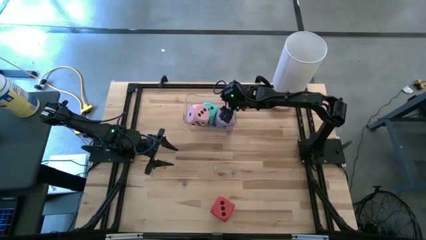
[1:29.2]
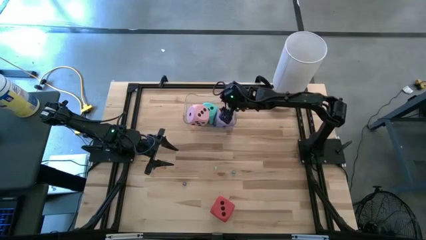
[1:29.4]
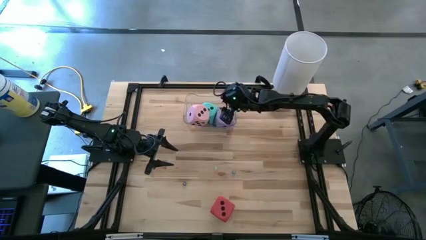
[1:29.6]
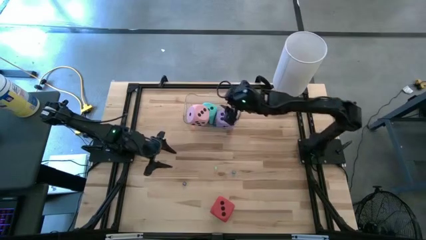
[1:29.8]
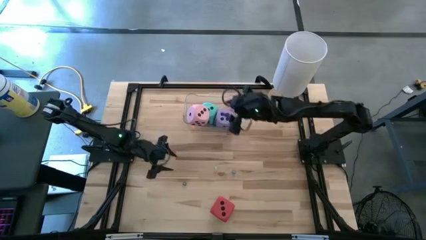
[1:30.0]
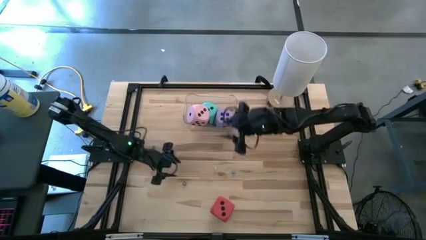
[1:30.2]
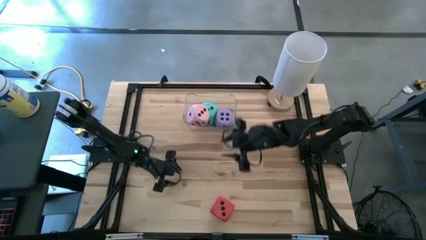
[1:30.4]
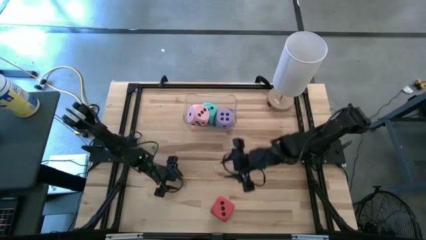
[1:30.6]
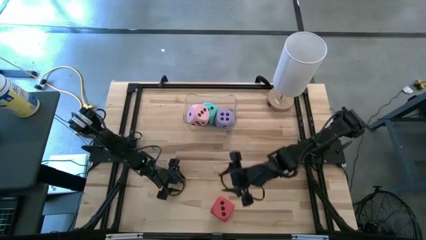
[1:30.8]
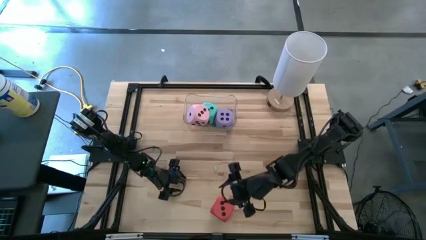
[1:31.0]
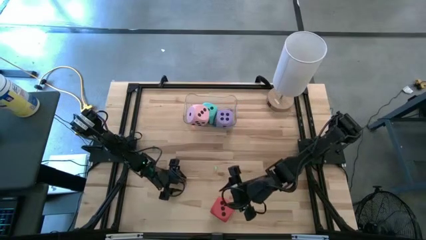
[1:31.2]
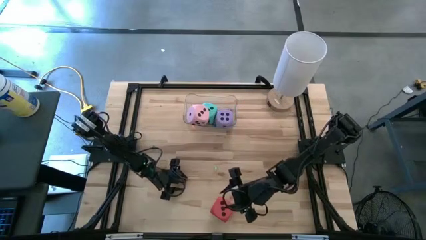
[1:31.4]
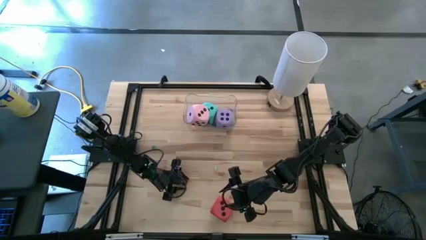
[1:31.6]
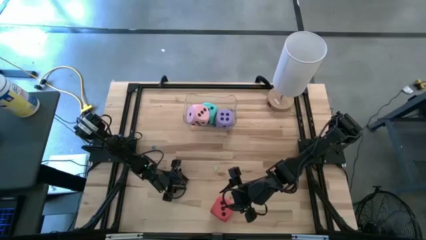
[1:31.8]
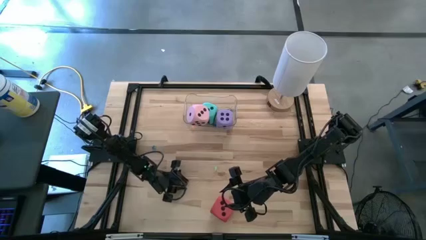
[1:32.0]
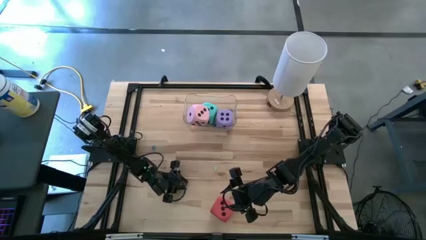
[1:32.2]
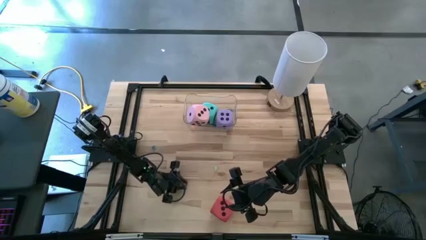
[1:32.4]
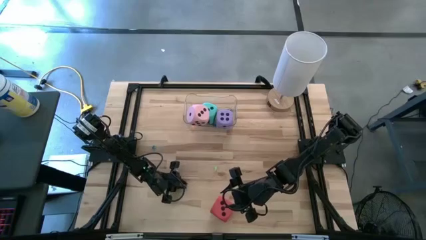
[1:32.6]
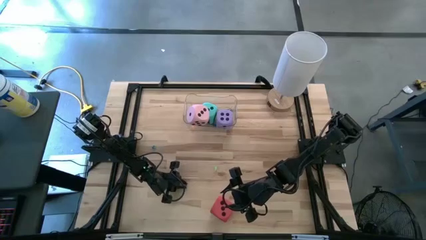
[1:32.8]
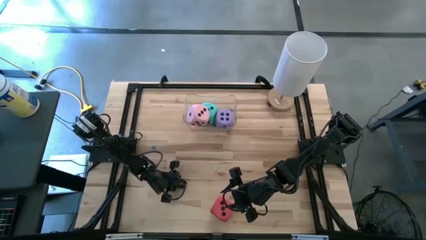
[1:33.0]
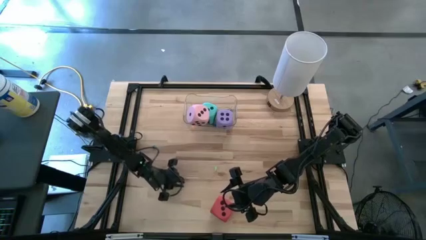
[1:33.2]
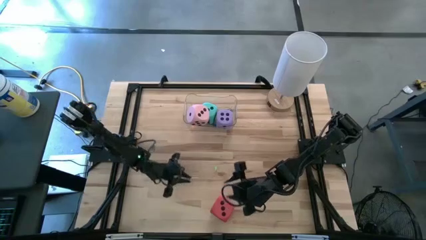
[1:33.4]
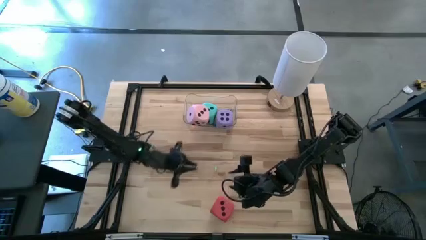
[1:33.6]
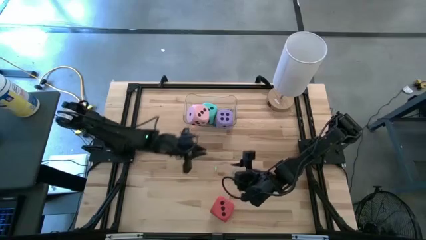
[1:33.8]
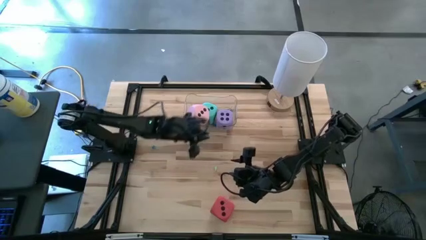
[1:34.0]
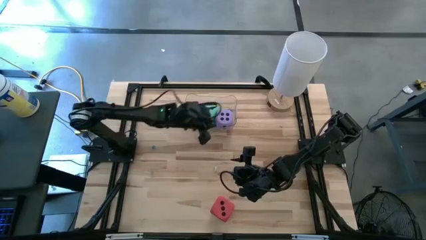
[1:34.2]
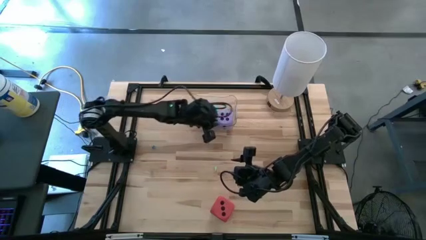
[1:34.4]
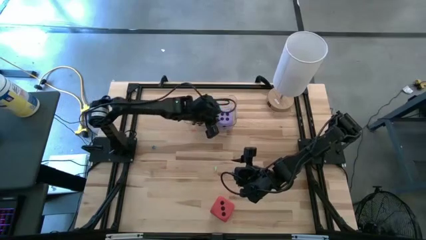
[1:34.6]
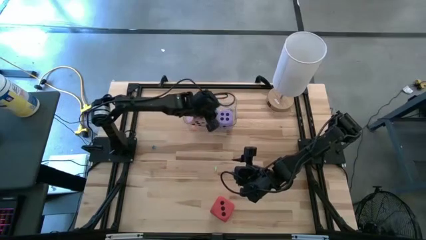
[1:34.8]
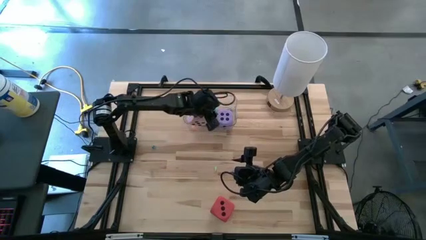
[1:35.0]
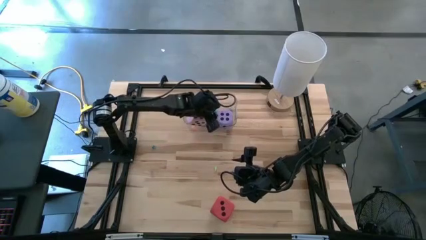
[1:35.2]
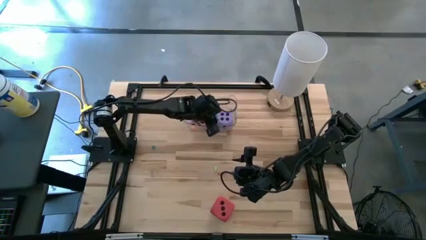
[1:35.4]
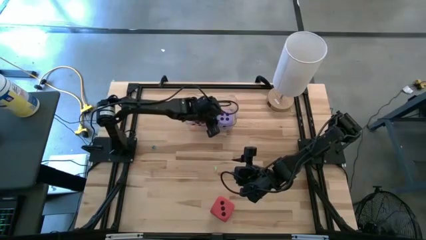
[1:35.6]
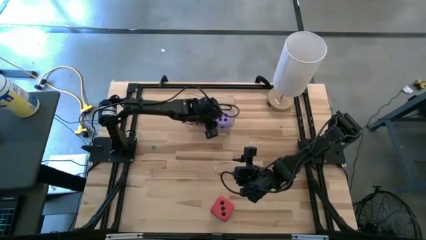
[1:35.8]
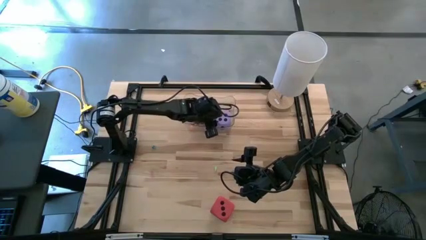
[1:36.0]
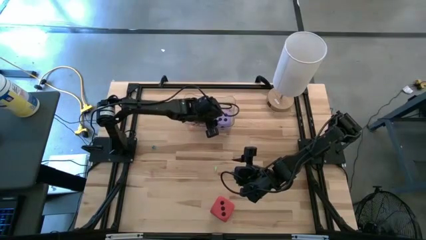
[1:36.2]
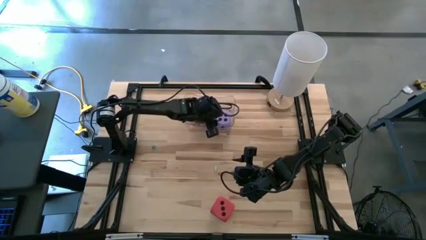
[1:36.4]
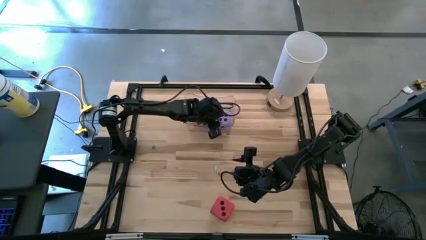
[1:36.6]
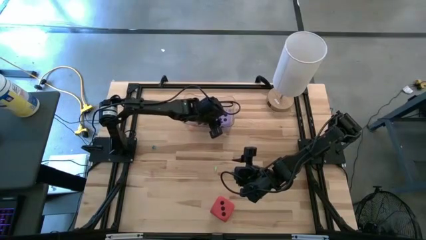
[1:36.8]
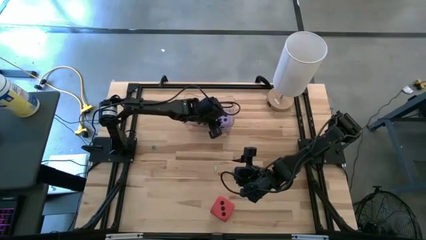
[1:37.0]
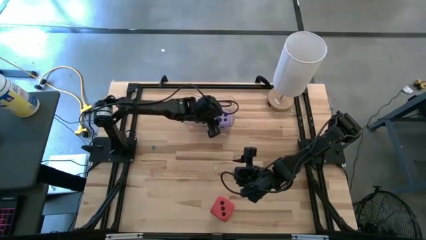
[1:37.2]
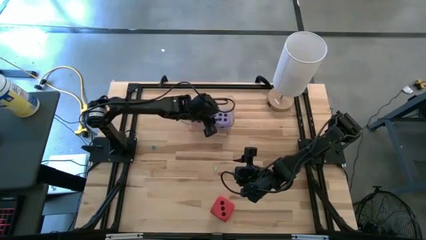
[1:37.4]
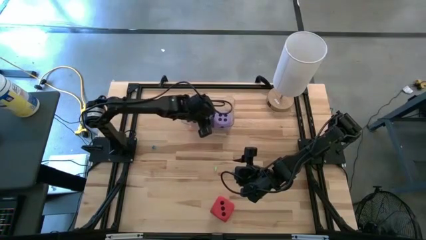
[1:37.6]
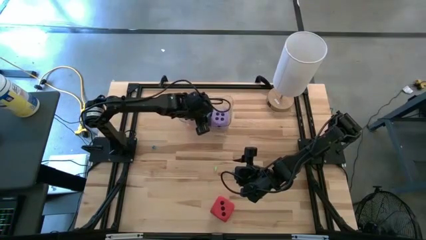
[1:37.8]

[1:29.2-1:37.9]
Task: Pick & Place Dice
Put the dark blue dice into the transparent bin

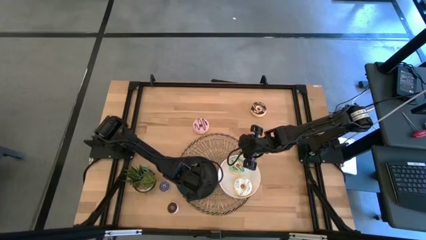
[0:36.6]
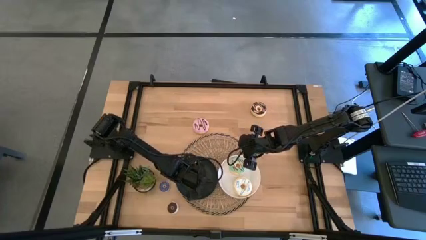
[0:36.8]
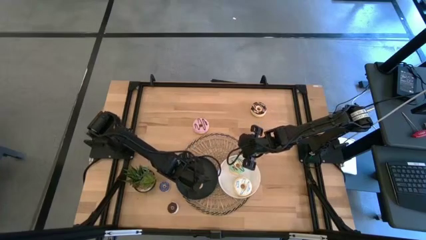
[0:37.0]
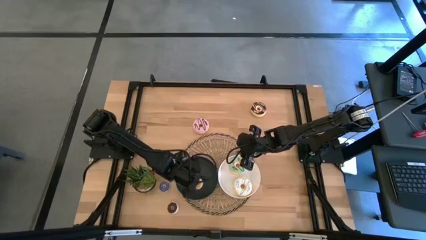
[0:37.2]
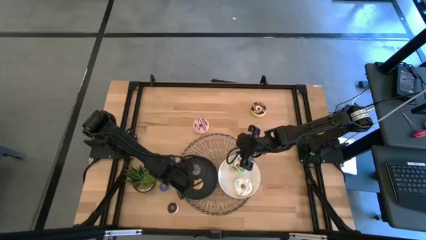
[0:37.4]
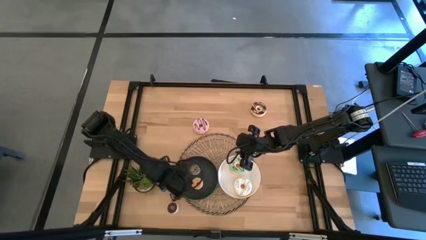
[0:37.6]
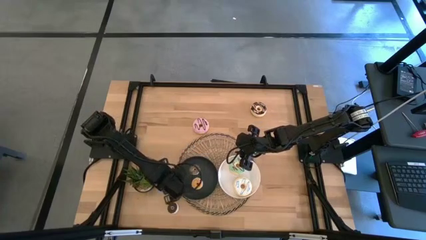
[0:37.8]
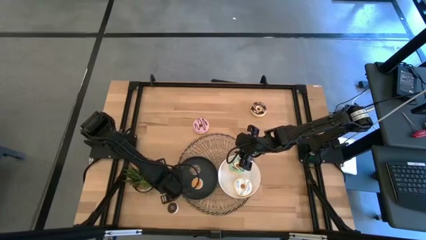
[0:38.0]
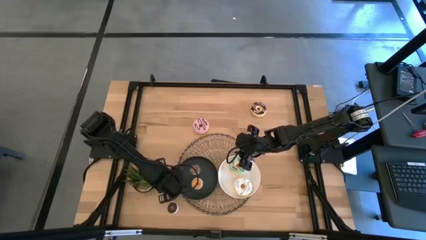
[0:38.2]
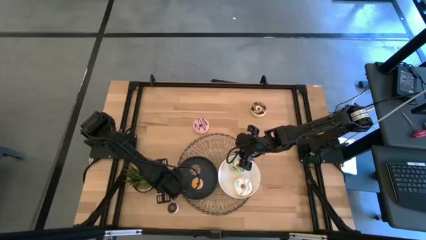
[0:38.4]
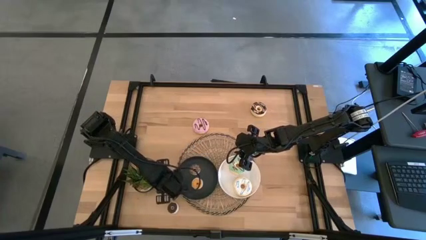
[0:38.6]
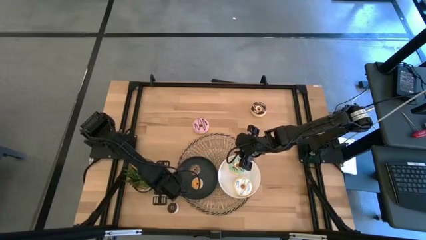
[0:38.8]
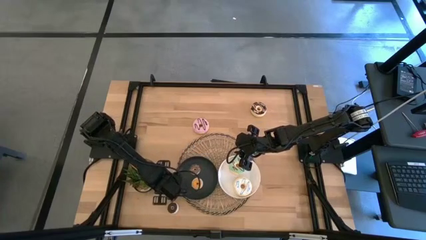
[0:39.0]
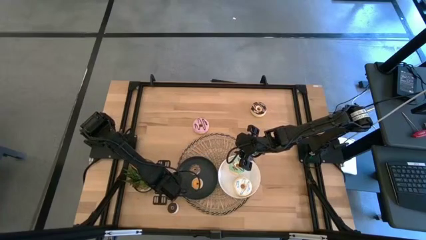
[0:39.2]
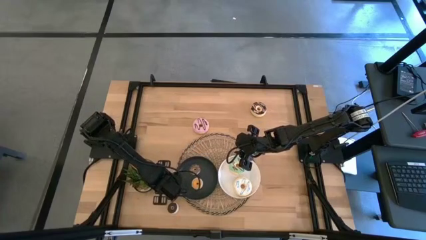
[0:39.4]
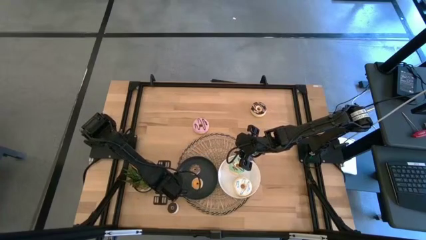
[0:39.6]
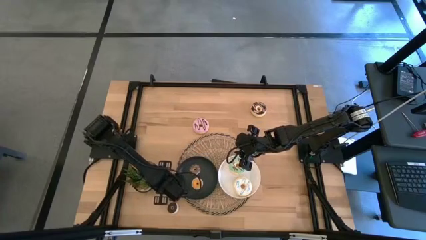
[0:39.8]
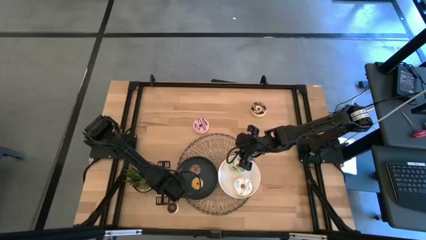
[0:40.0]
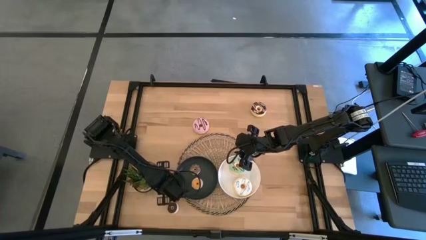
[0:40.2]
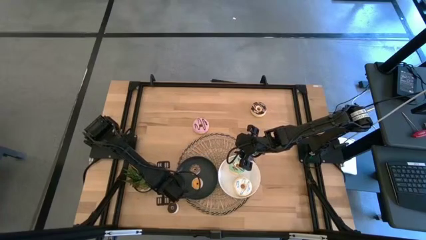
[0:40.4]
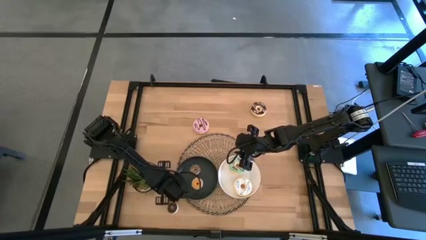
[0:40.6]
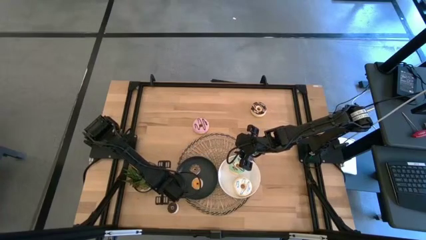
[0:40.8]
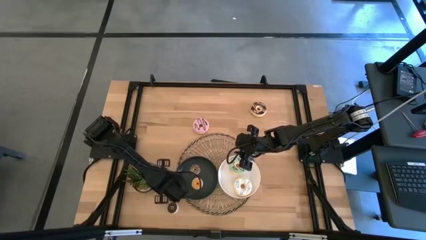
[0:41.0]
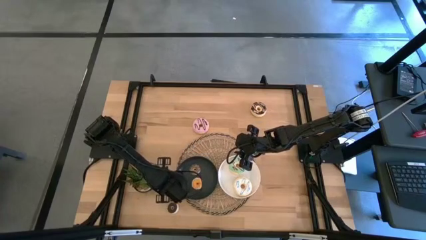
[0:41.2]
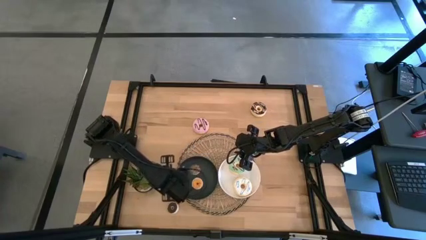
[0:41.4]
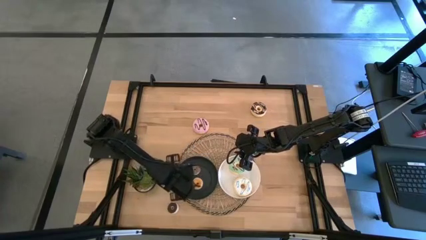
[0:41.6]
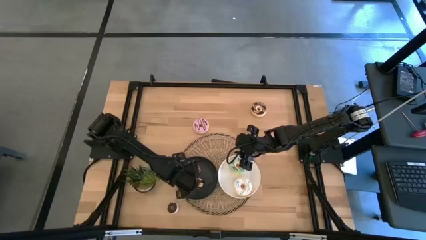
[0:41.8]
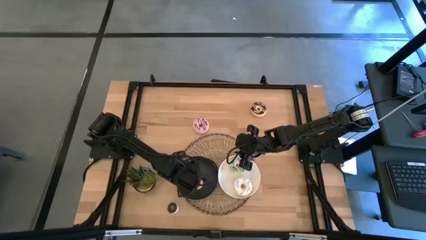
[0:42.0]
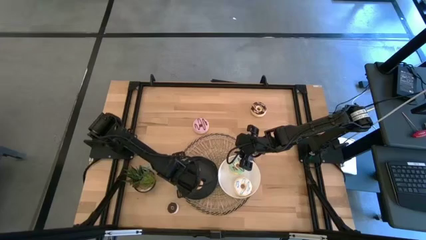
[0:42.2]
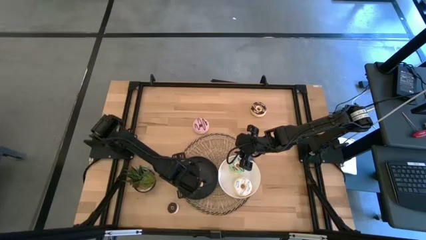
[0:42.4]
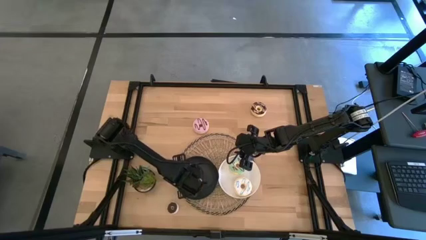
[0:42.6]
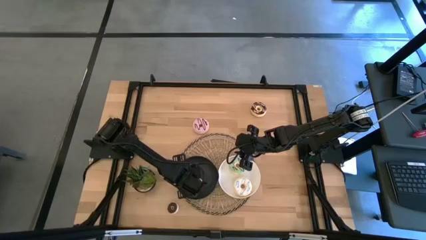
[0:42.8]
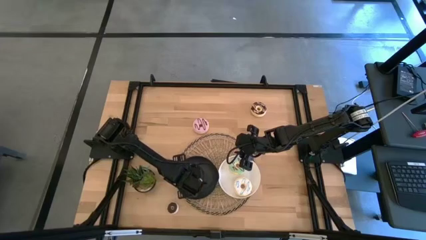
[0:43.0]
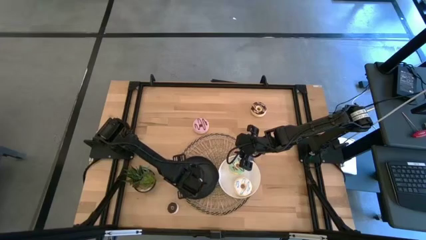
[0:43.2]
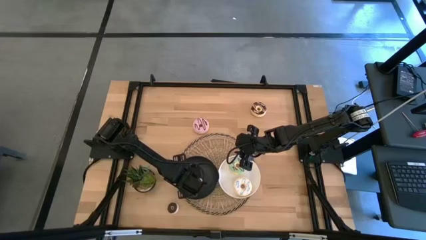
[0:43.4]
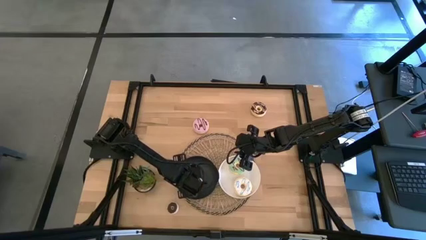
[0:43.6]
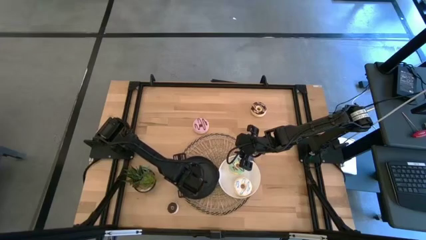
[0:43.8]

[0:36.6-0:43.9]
Task: Pick & Place donuts
Put the small blue donut on the black plate
